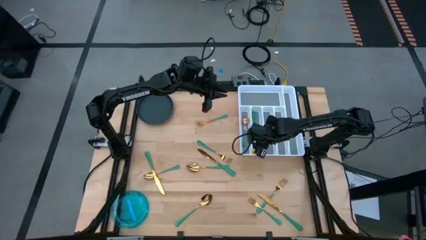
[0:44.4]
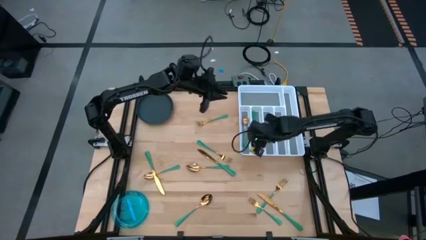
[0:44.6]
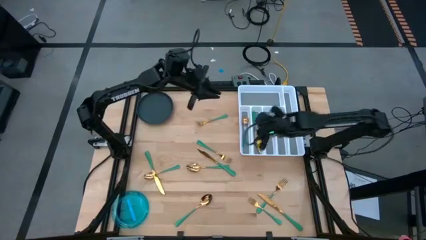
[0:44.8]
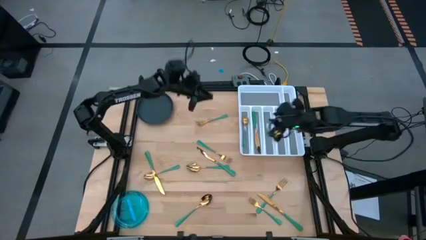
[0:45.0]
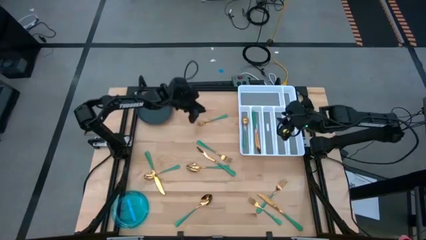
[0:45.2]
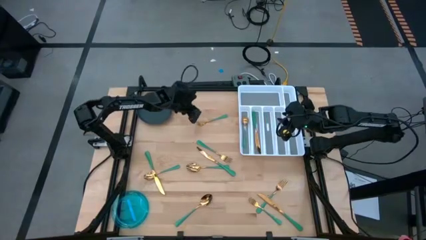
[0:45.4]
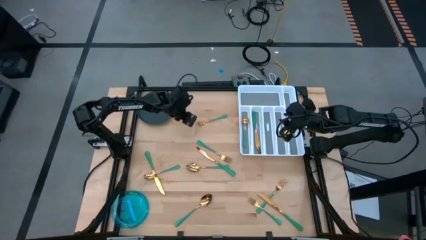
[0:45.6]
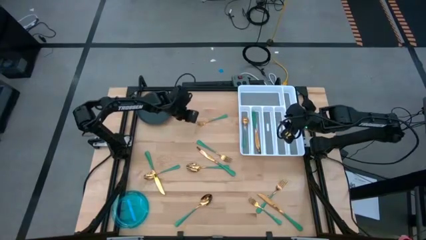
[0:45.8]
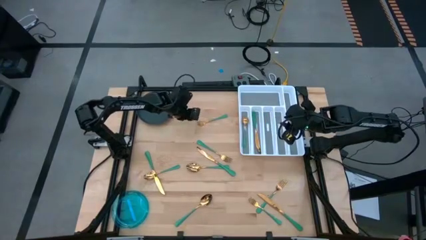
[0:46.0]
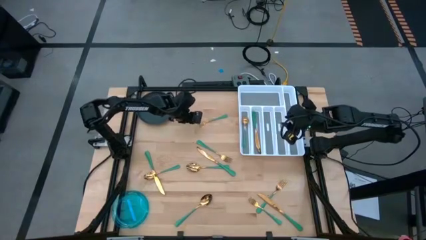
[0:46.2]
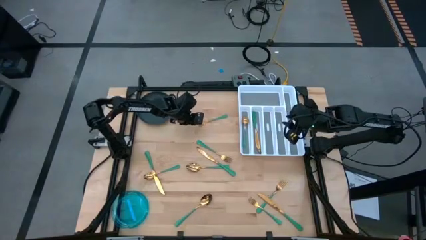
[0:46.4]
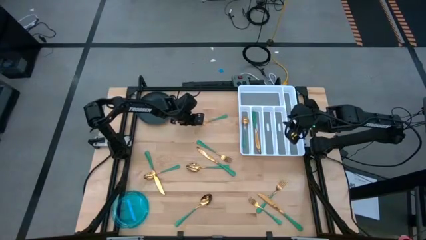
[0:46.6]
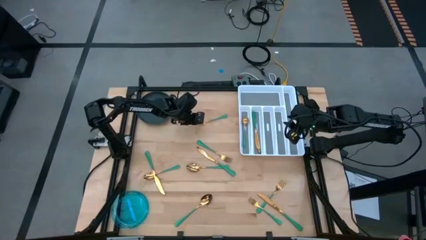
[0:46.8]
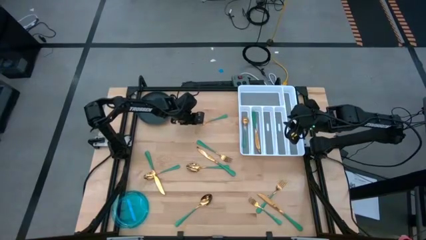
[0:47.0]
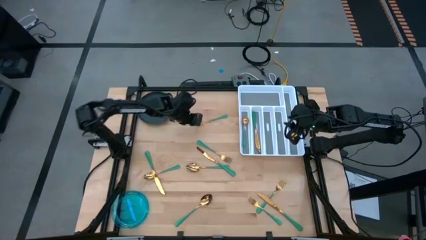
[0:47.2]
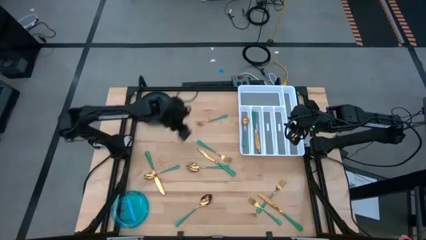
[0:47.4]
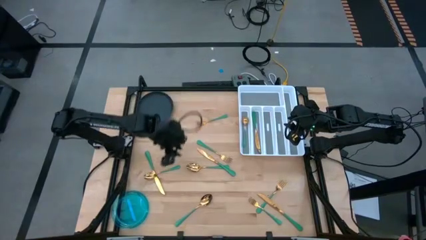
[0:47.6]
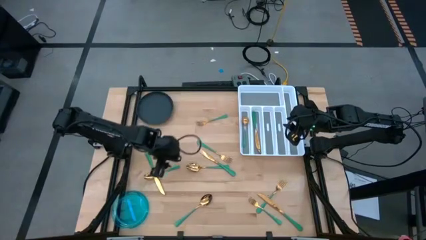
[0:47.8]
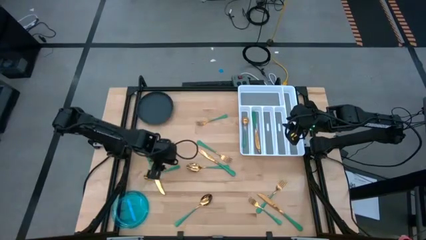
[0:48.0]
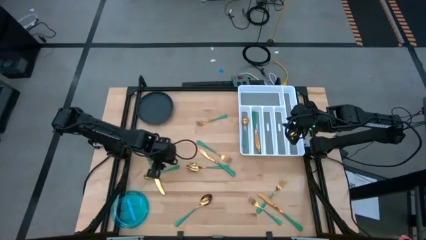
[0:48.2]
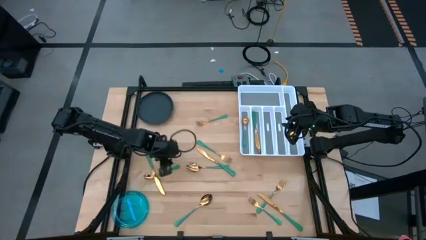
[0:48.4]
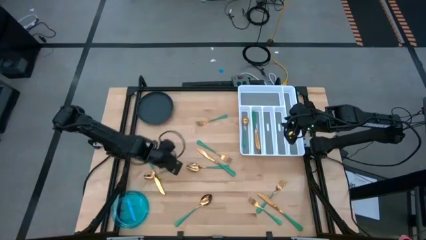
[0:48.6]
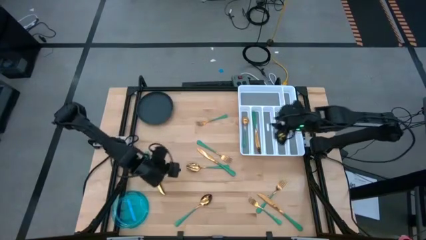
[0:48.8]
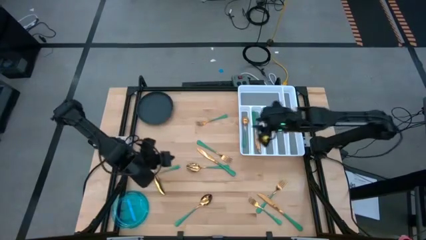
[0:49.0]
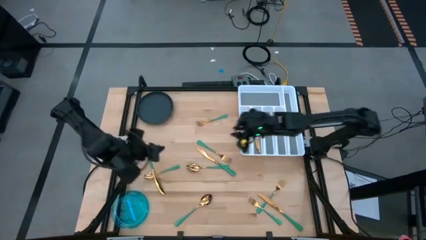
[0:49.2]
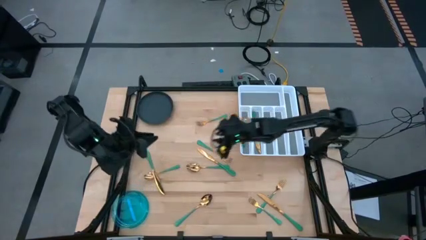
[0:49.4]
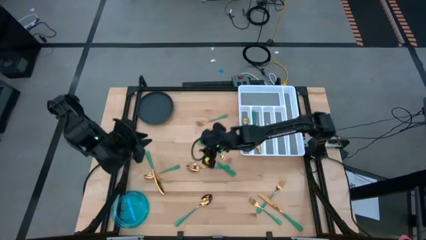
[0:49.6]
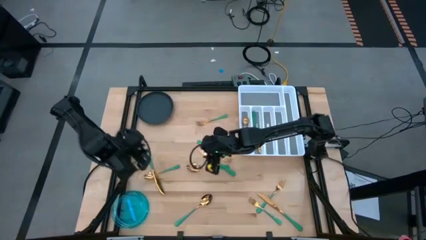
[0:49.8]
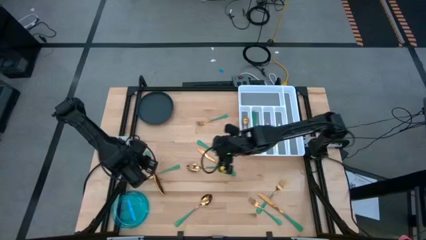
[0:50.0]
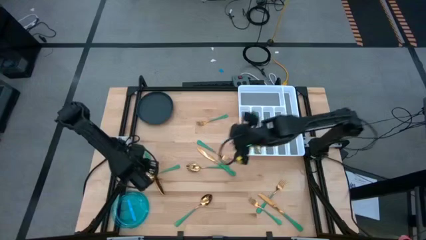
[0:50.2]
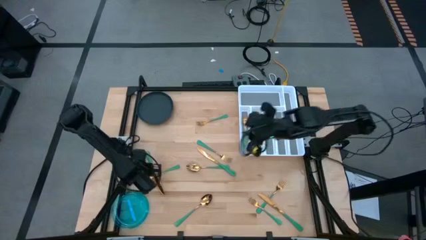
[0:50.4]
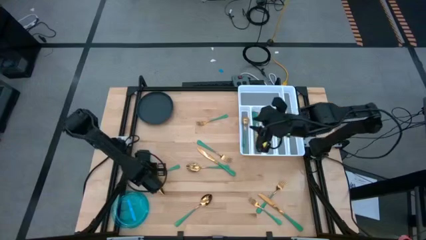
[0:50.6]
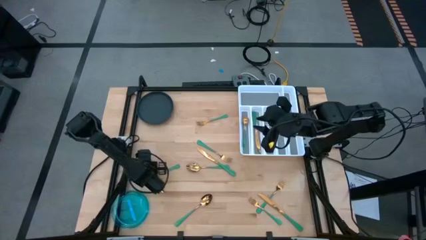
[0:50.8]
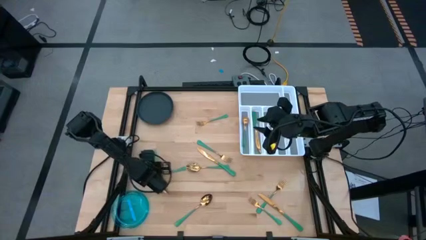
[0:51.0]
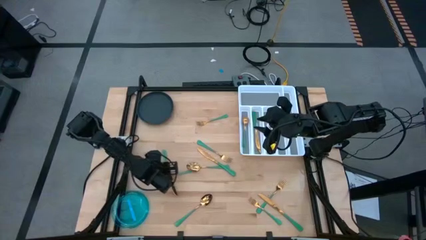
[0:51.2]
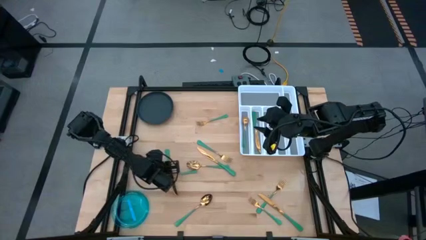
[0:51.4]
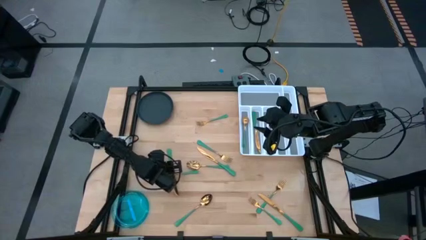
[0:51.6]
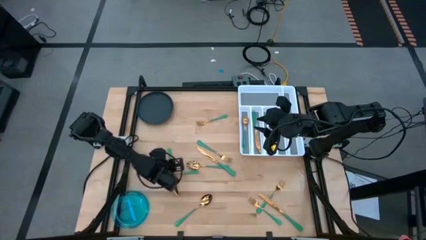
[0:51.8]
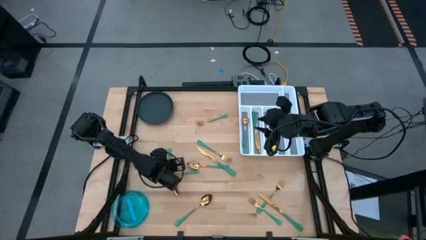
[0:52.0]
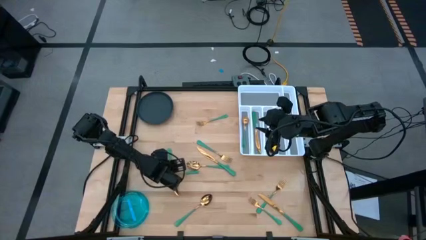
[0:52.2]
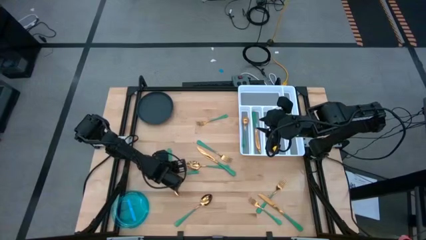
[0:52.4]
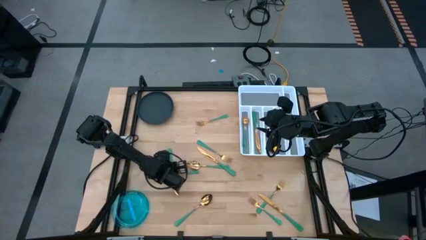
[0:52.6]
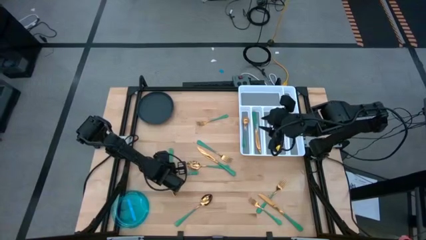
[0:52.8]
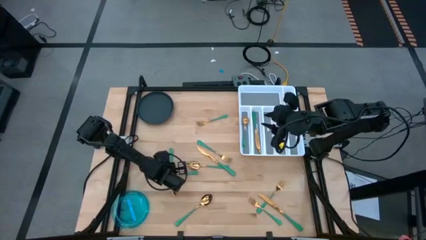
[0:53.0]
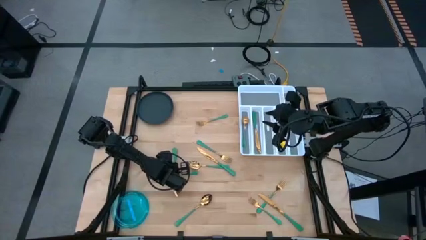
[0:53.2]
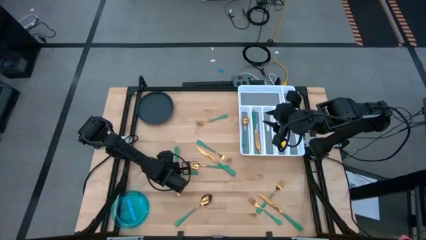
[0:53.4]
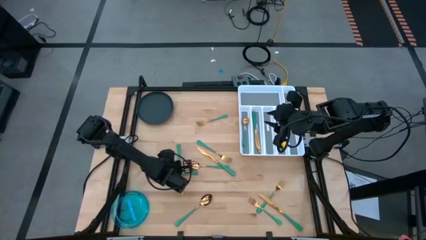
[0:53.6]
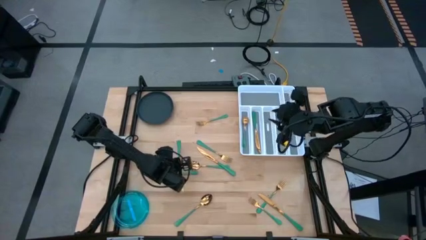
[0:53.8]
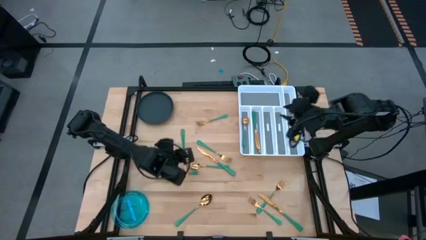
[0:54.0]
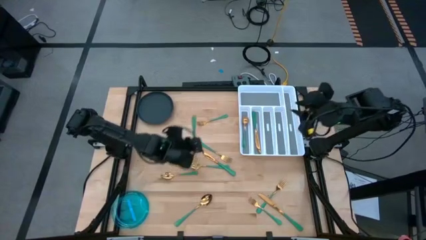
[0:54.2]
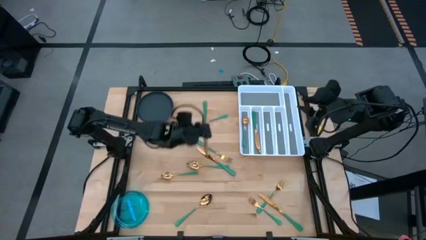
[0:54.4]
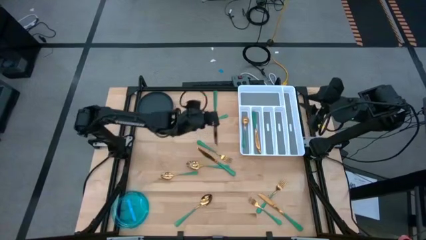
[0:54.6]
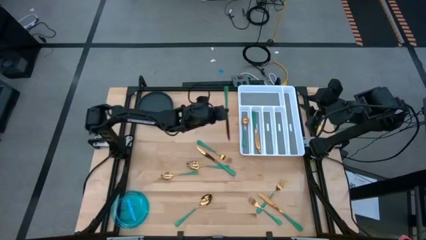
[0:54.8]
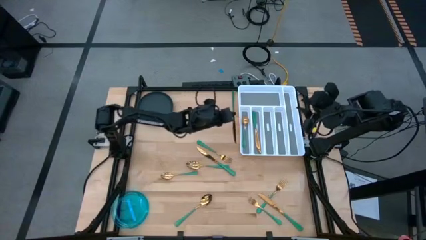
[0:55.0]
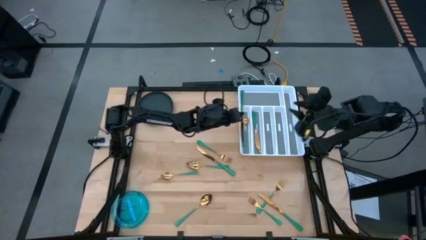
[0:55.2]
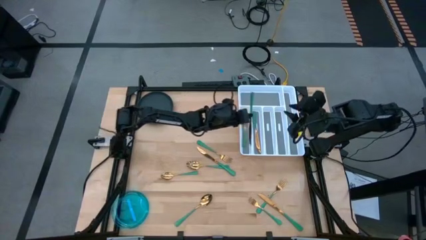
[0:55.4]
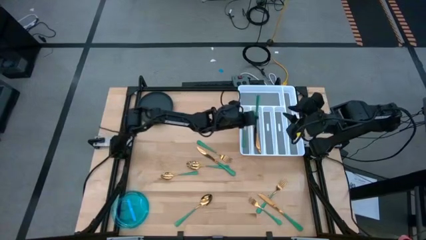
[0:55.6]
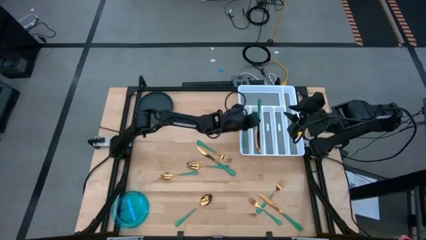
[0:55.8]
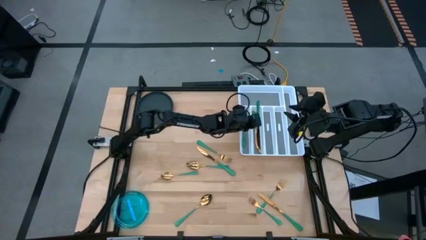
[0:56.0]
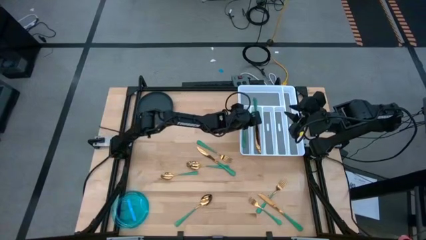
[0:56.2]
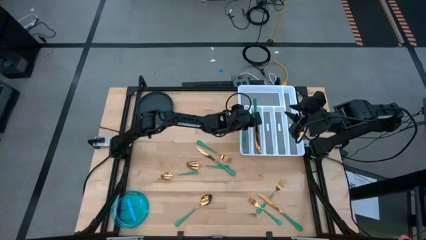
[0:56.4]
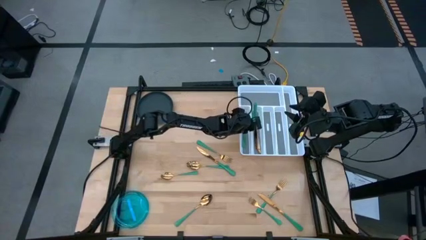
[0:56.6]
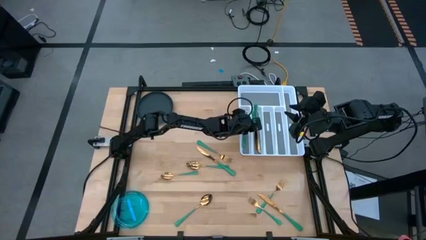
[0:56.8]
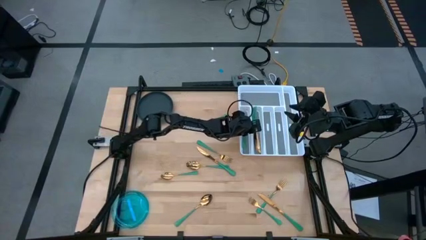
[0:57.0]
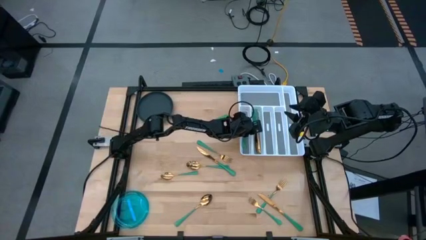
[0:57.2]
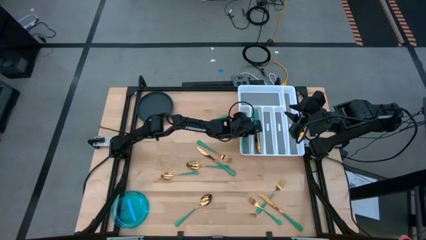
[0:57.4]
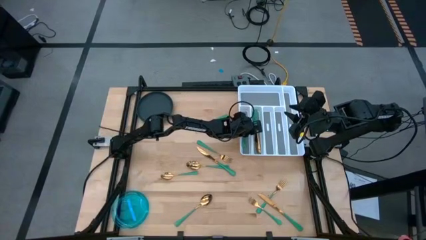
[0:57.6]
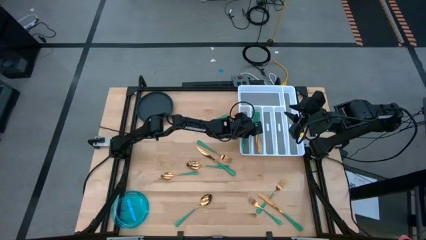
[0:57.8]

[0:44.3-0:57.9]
Task: Sort silverware
Put the green knife into the silverware tray
